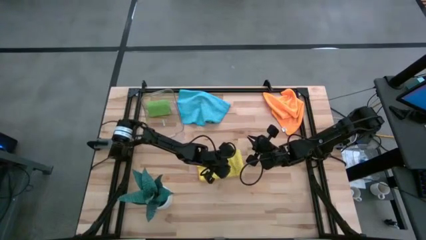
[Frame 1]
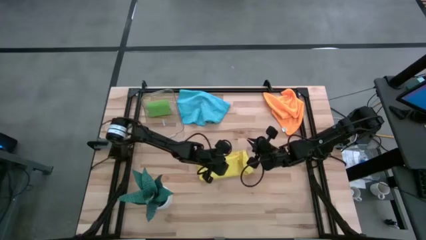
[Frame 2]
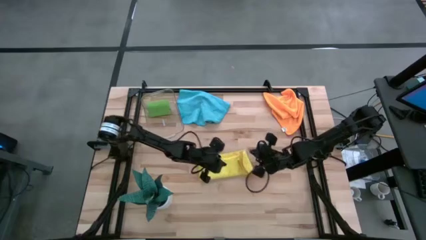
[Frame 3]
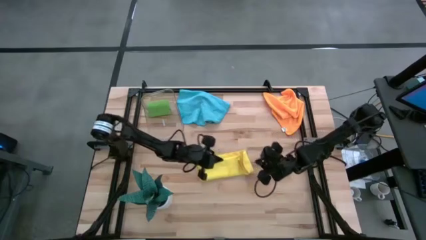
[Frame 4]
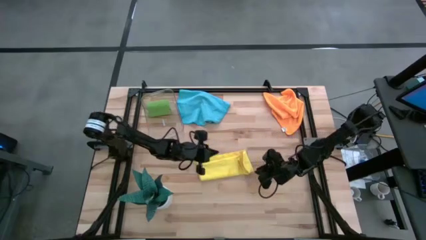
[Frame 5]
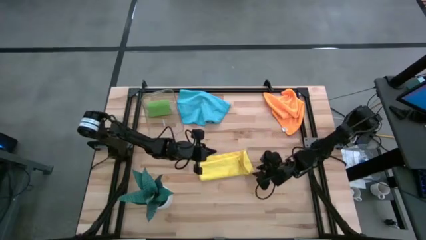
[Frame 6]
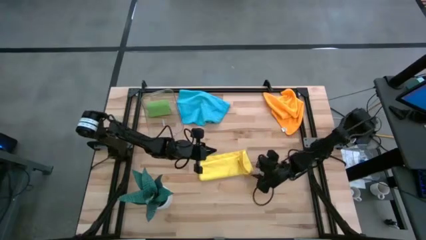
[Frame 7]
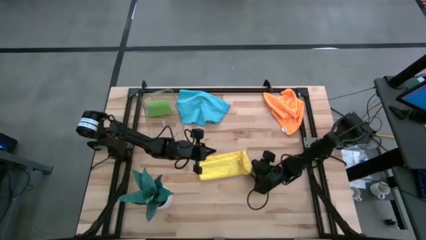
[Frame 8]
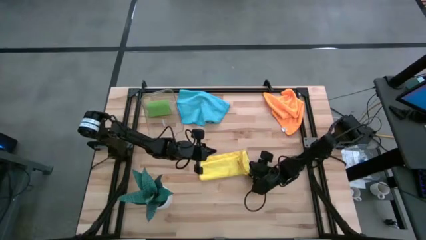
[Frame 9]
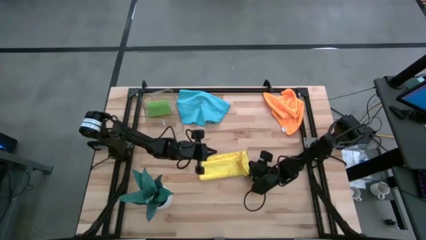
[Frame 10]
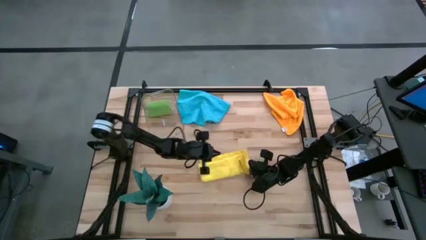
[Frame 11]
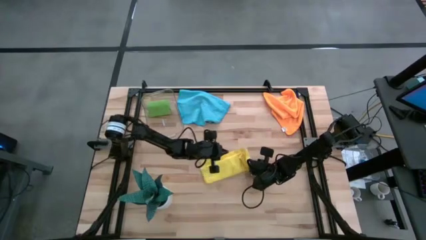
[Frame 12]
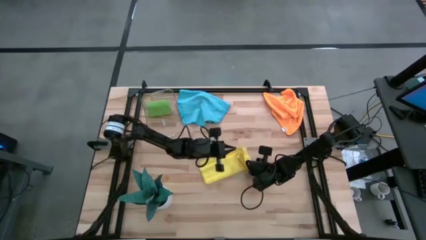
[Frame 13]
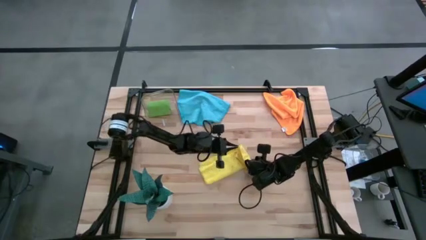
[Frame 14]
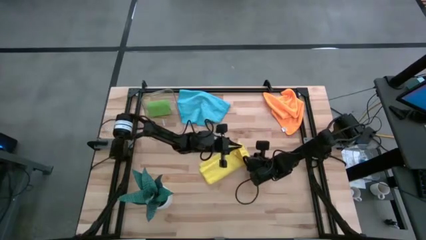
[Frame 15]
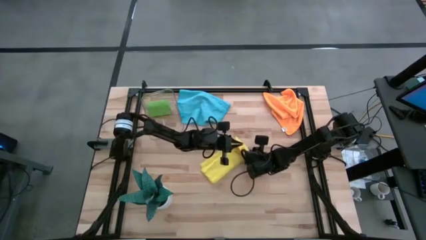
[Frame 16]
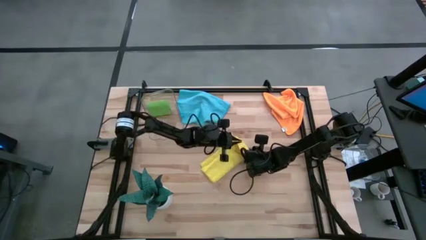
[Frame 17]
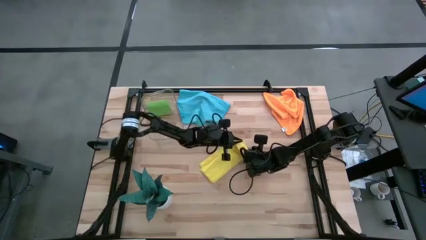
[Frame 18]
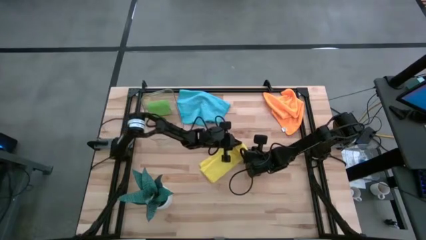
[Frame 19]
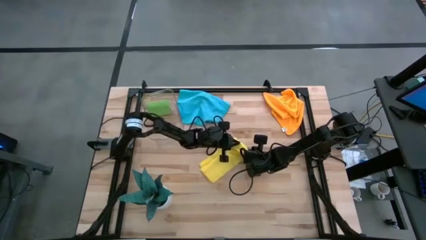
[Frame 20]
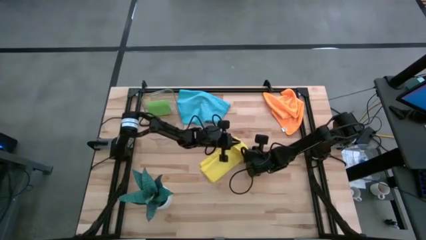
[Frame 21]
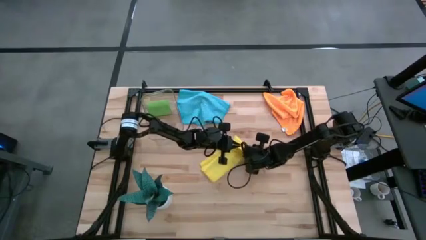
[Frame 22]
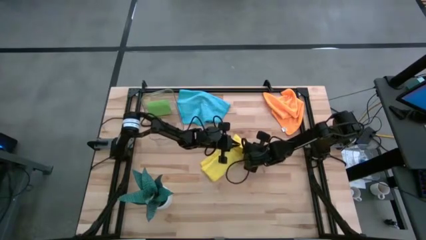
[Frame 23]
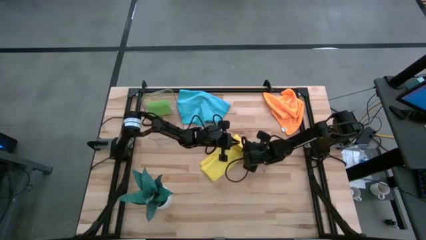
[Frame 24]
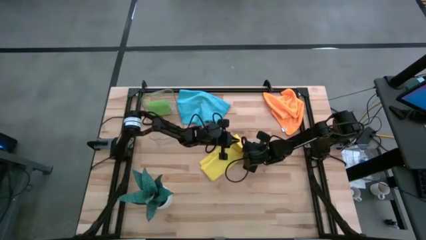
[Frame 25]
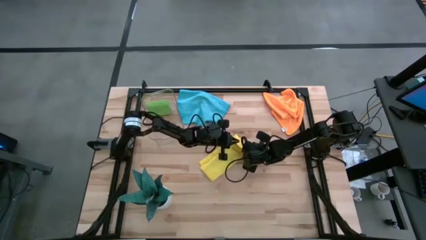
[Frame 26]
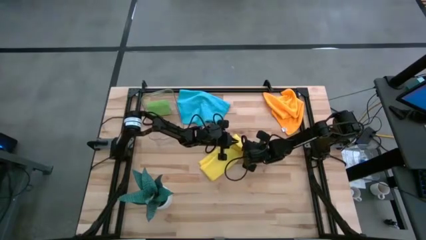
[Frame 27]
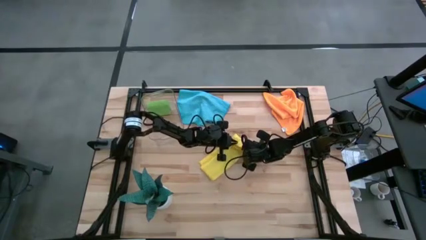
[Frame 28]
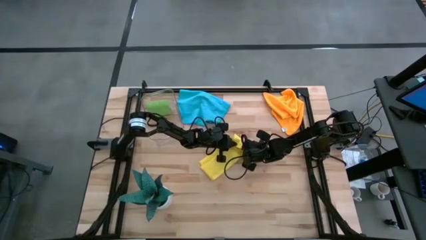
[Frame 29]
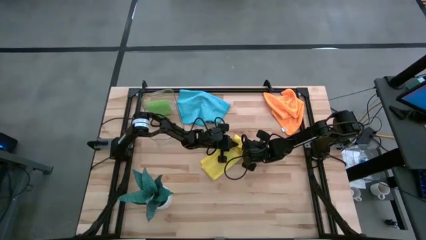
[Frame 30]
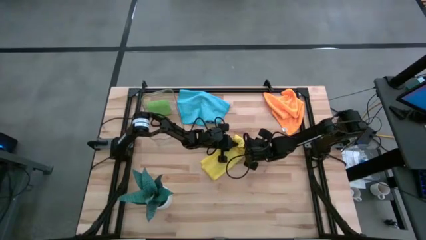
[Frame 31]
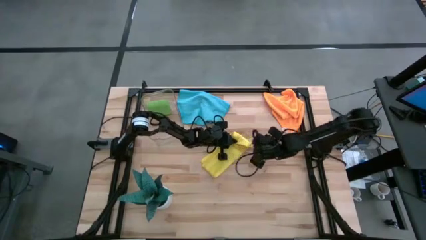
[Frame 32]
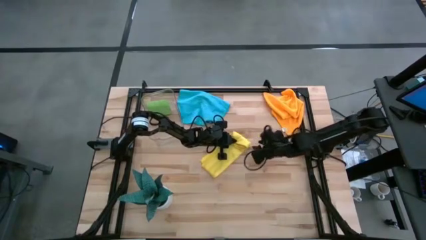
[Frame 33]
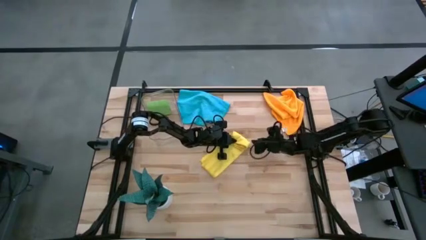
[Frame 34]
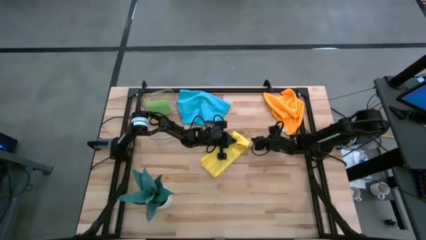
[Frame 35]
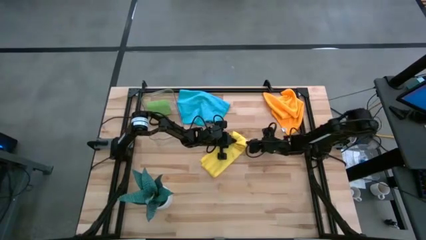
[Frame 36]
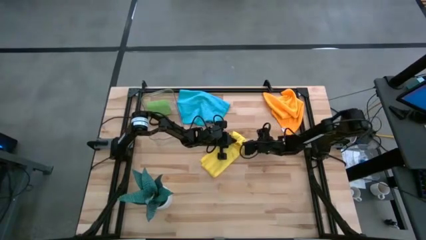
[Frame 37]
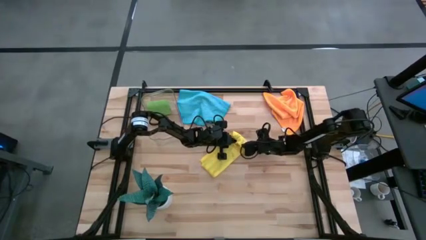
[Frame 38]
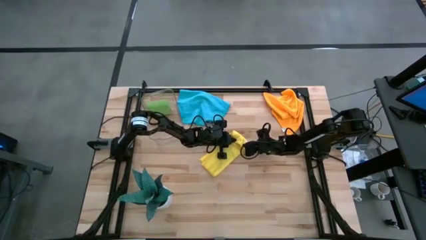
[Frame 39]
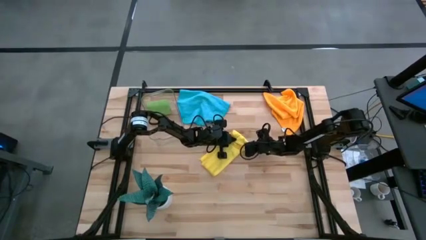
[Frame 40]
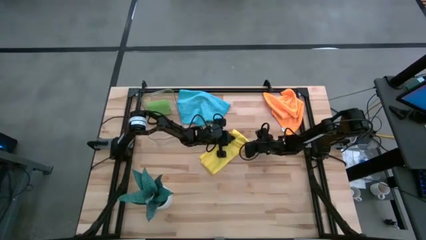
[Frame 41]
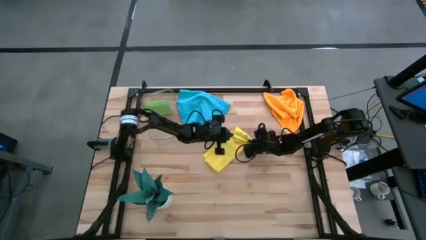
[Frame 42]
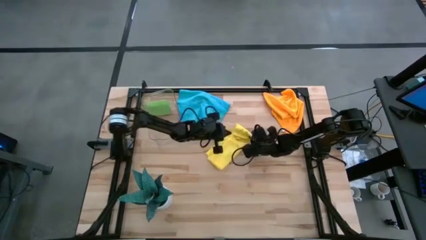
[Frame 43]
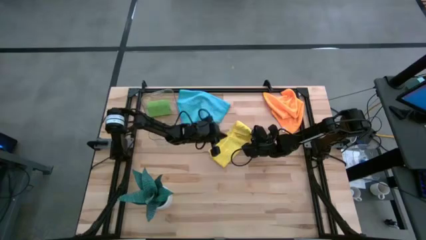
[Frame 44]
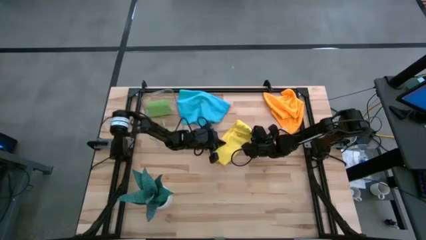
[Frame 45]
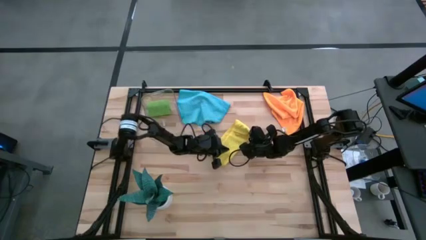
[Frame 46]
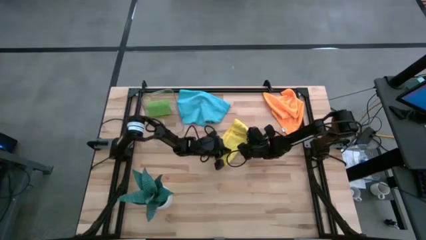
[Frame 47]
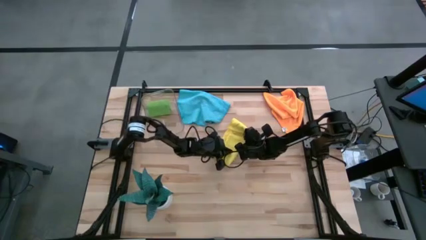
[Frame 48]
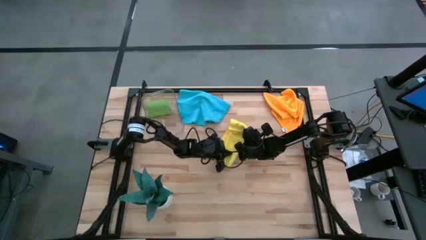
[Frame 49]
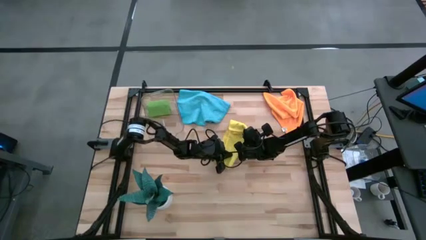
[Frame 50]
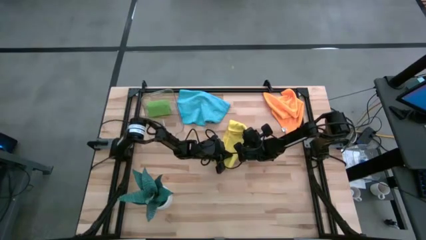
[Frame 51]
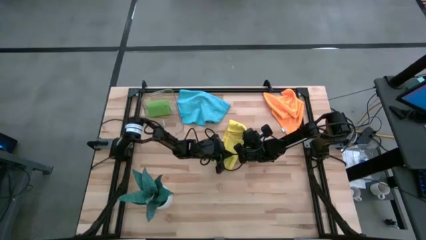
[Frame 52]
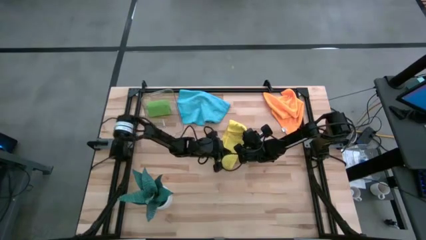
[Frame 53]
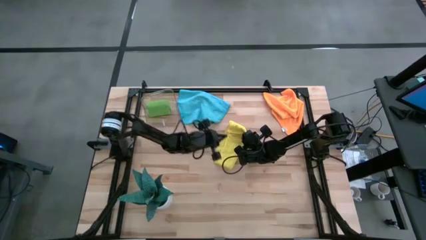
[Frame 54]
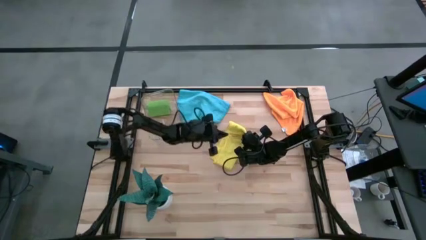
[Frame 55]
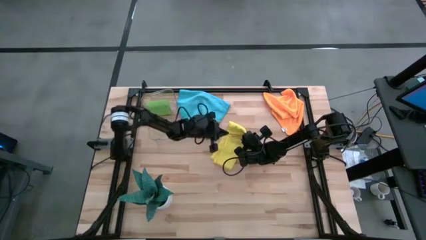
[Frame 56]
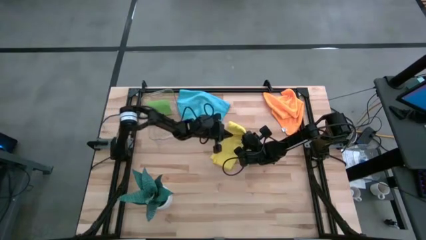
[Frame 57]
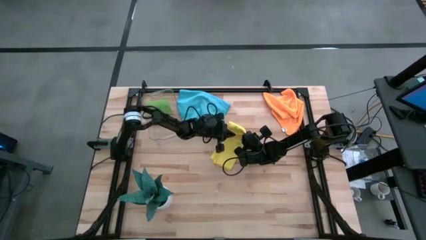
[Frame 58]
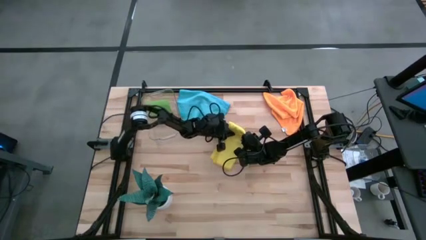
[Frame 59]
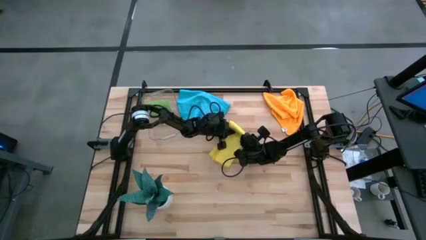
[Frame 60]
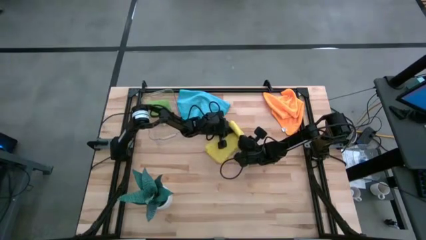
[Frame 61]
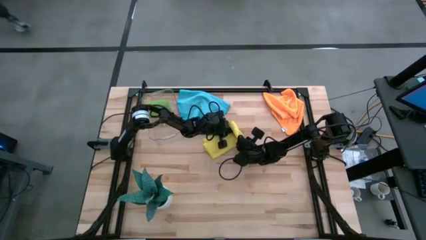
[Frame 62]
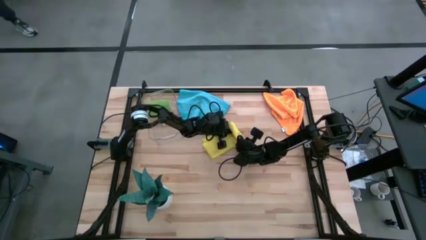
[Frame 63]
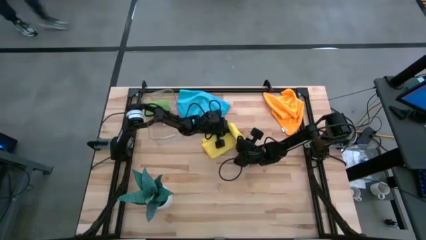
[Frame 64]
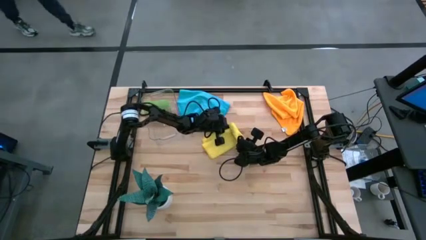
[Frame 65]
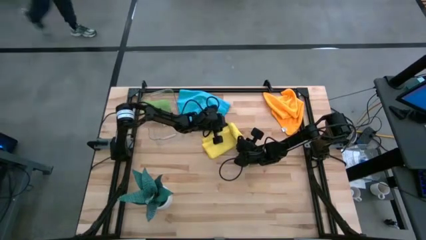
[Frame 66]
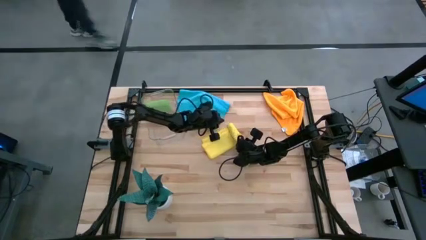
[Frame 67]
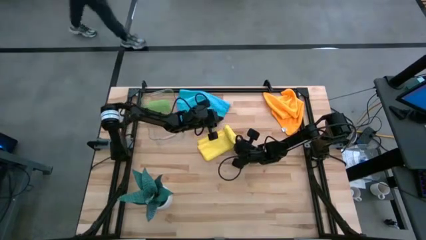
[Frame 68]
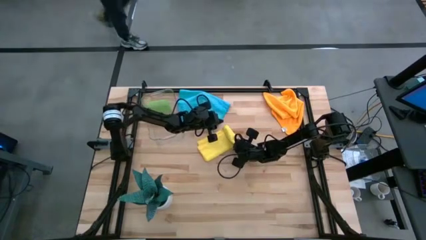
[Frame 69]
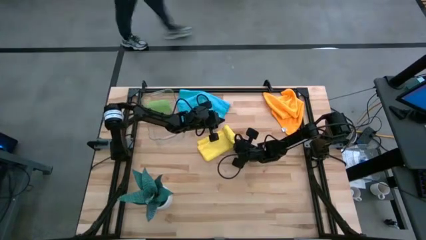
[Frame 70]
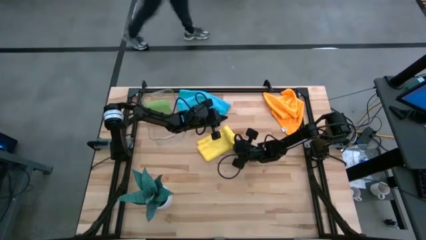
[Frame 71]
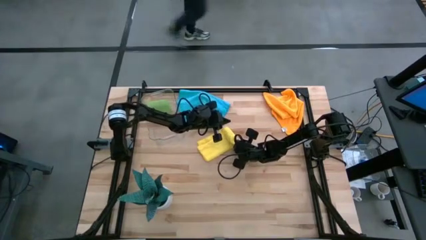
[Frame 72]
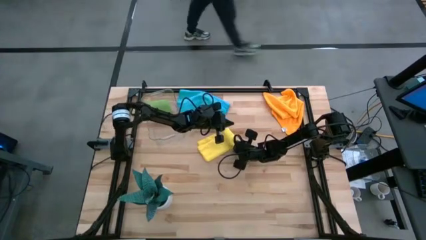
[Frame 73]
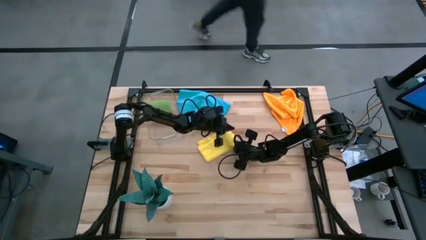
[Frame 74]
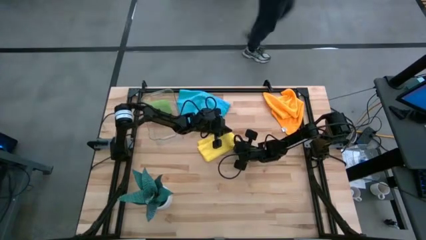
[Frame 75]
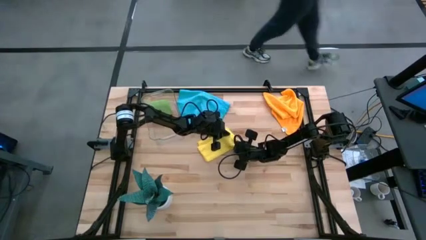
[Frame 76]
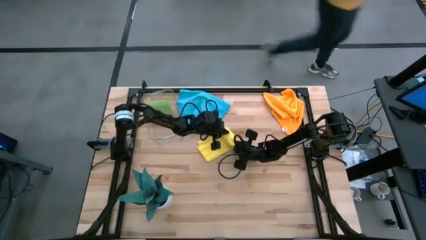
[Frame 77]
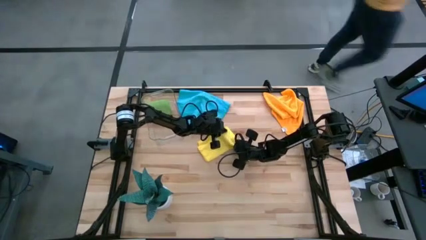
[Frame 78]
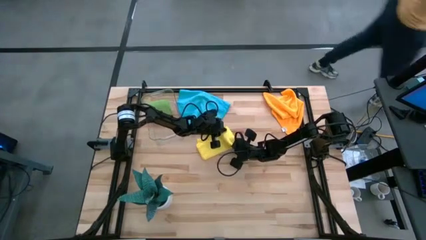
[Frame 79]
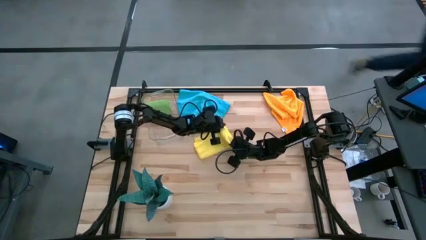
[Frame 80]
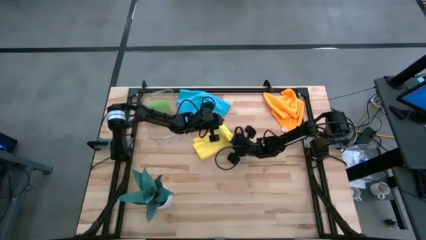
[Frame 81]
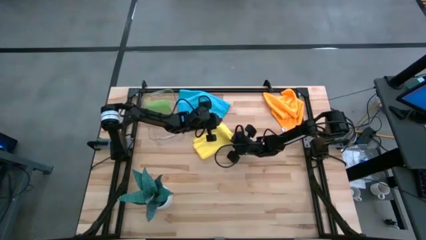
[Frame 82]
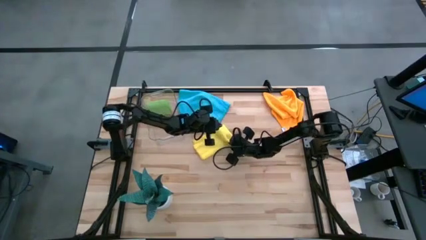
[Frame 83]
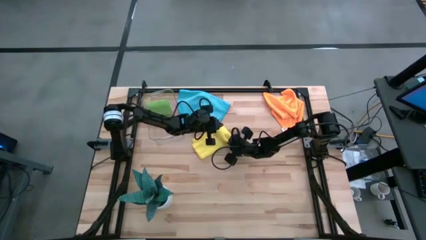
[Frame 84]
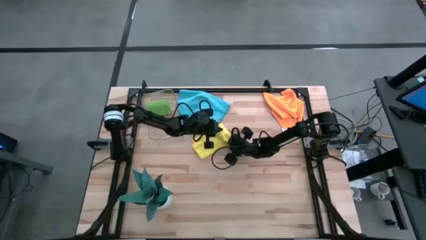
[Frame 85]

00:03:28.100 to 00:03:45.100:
Task: Roll microfiber towels into tight, uniform cylinder then place into a basket
Roll the yellow microfiber towel

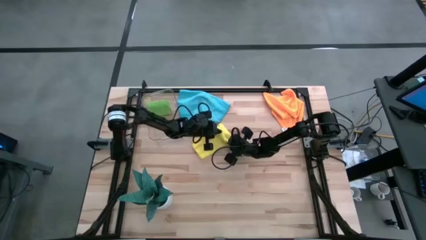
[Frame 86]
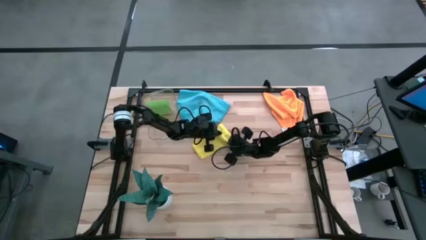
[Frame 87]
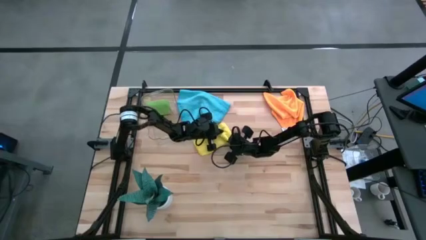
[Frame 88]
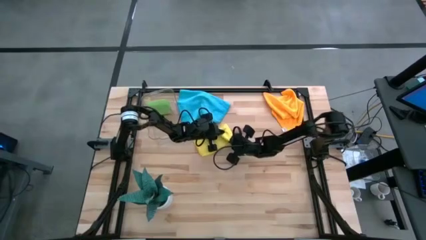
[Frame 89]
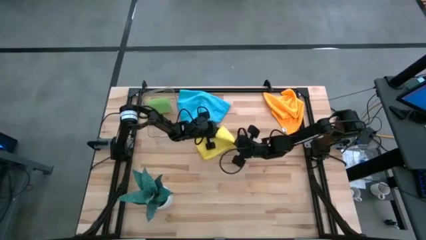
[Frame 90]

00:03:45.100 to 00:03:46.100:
Roll the yellow microfiber towel
